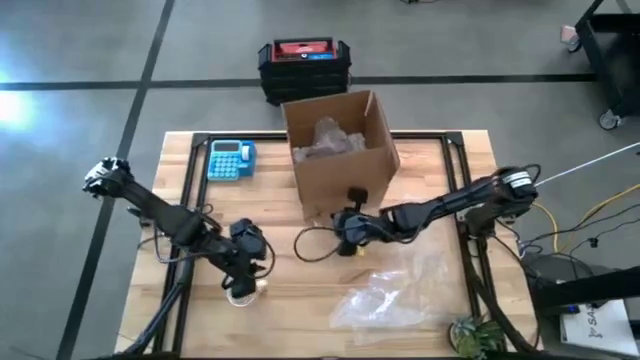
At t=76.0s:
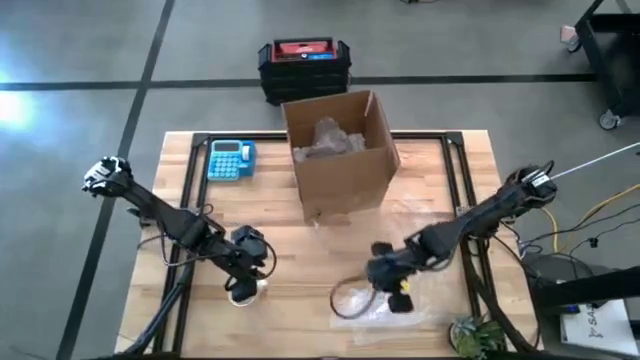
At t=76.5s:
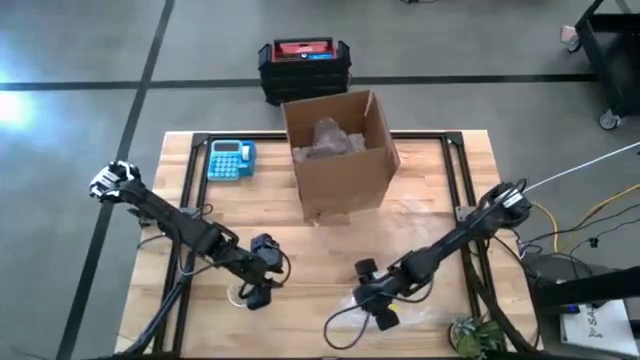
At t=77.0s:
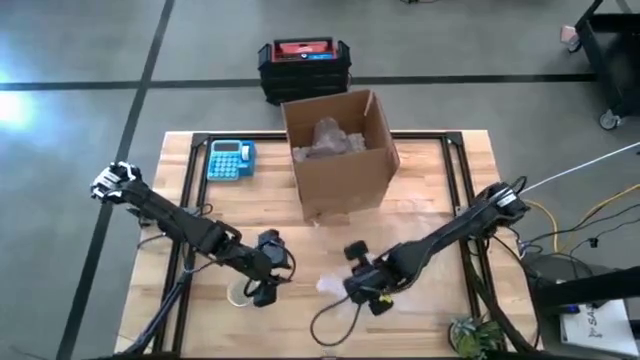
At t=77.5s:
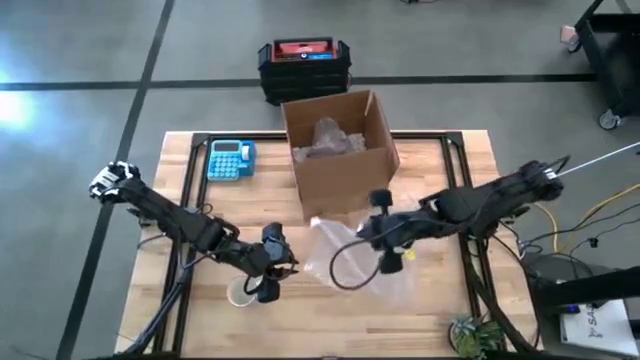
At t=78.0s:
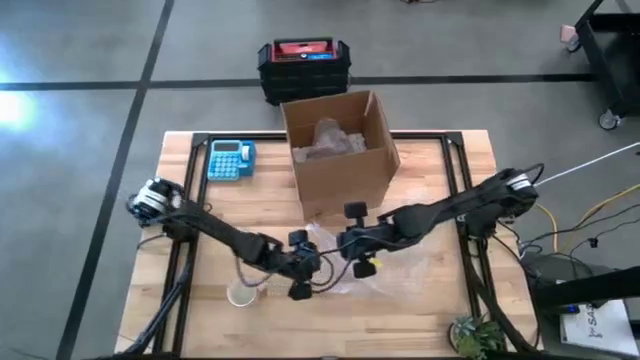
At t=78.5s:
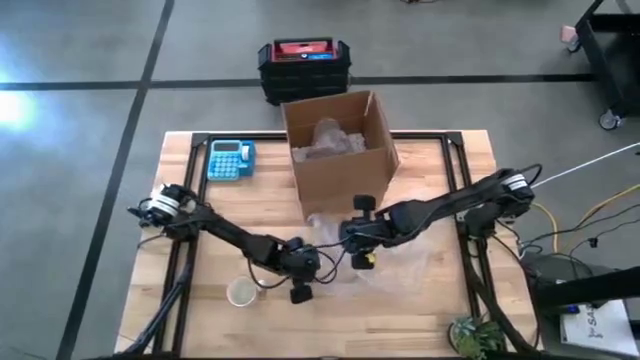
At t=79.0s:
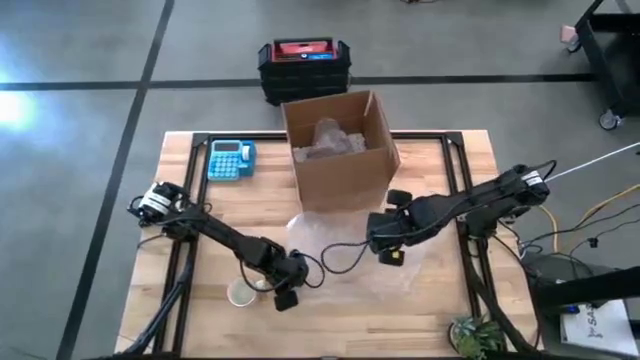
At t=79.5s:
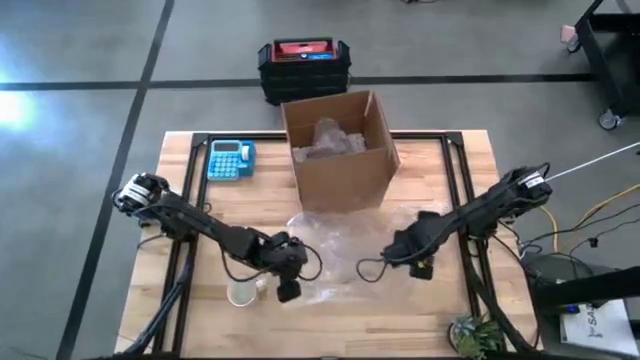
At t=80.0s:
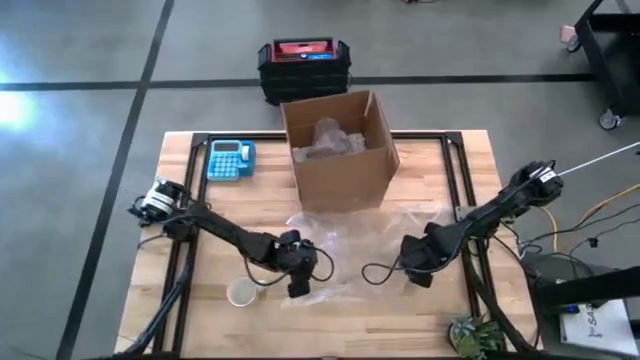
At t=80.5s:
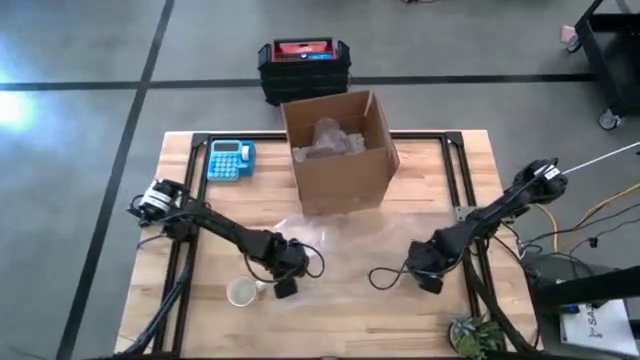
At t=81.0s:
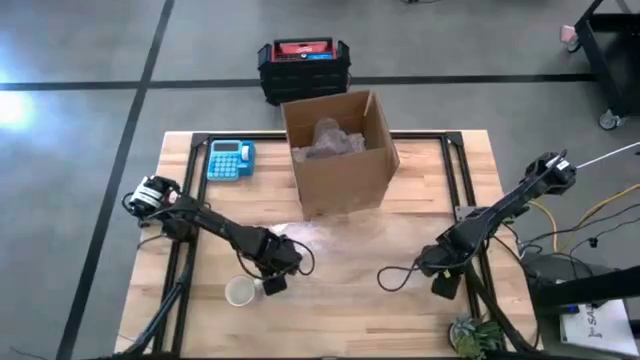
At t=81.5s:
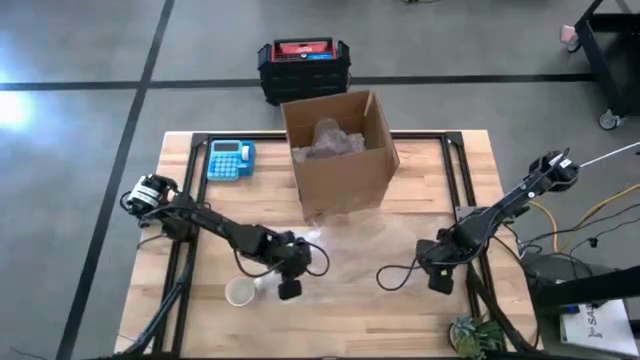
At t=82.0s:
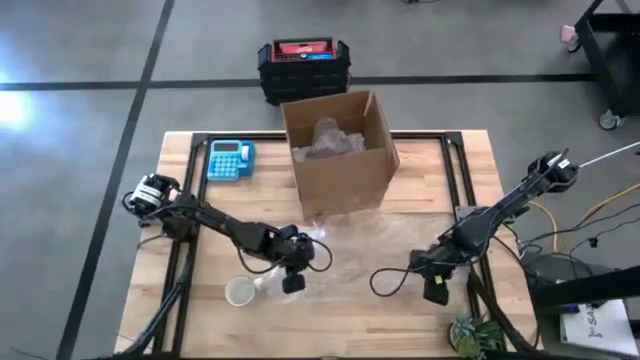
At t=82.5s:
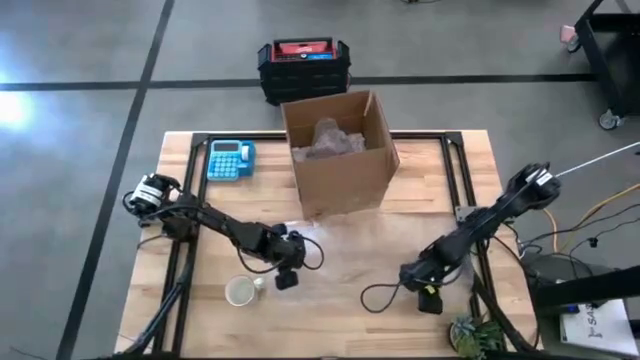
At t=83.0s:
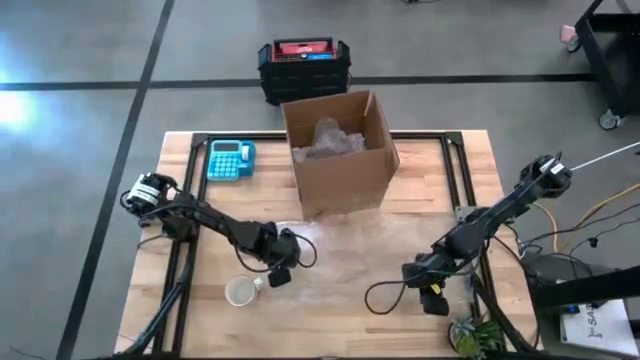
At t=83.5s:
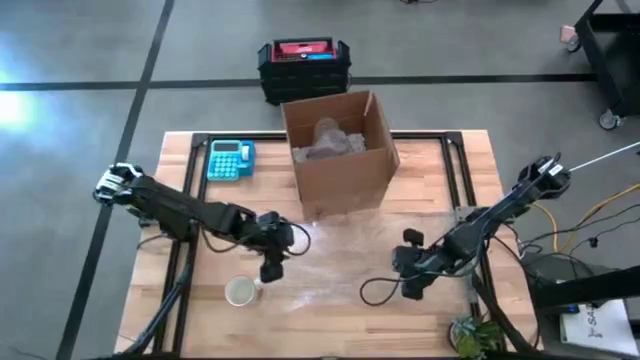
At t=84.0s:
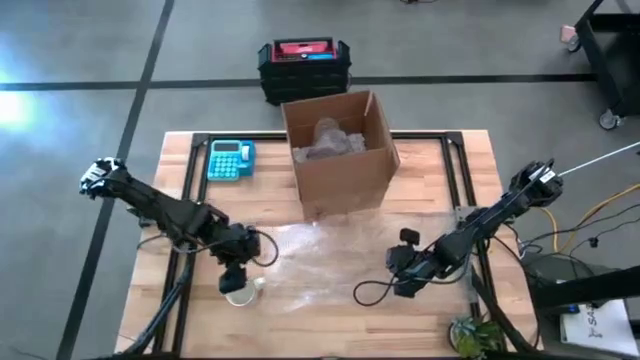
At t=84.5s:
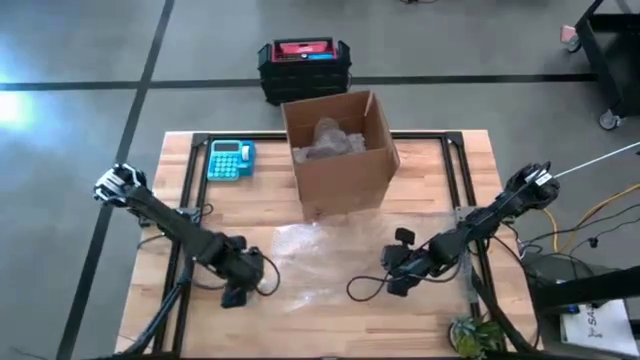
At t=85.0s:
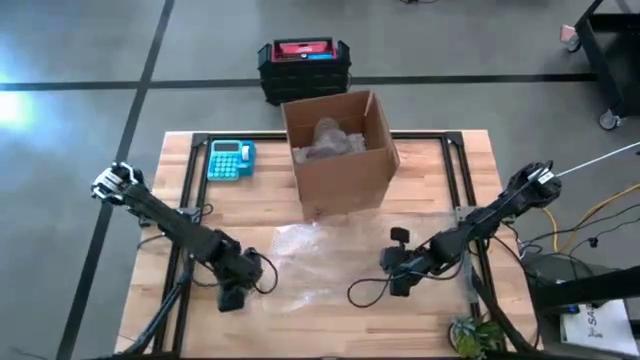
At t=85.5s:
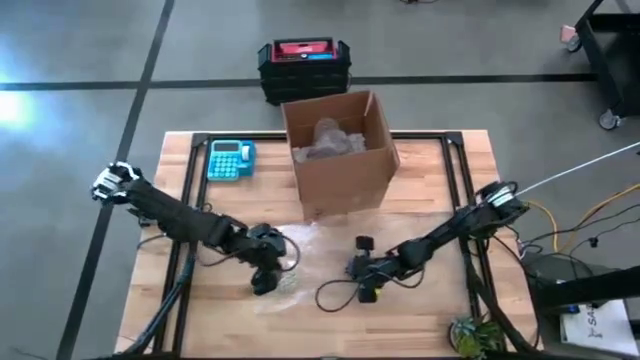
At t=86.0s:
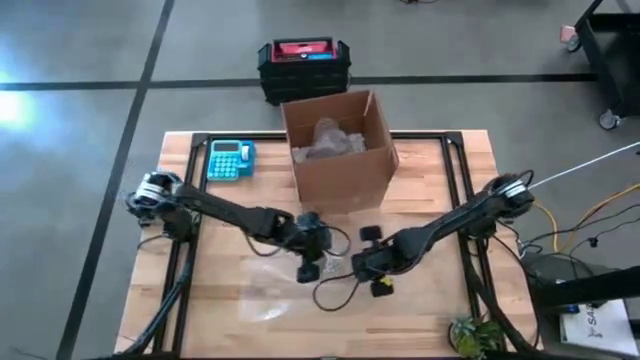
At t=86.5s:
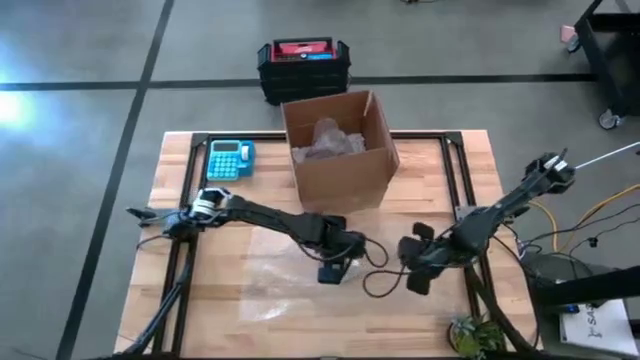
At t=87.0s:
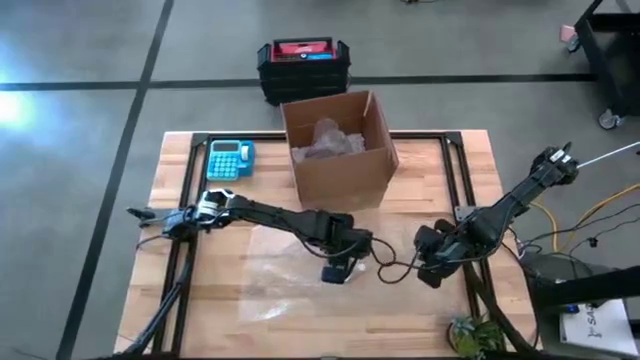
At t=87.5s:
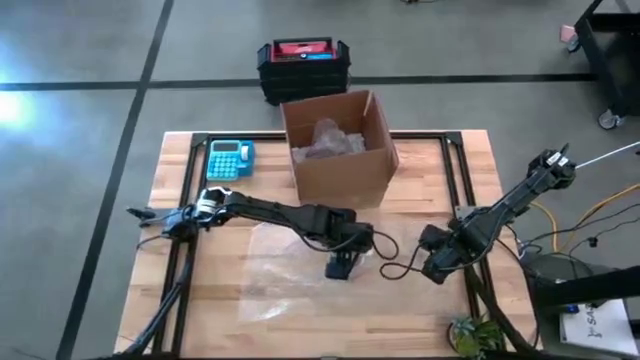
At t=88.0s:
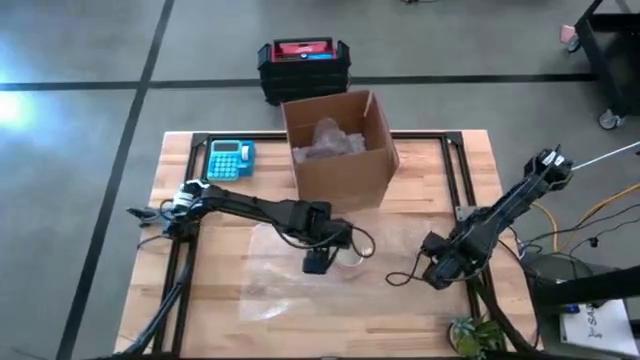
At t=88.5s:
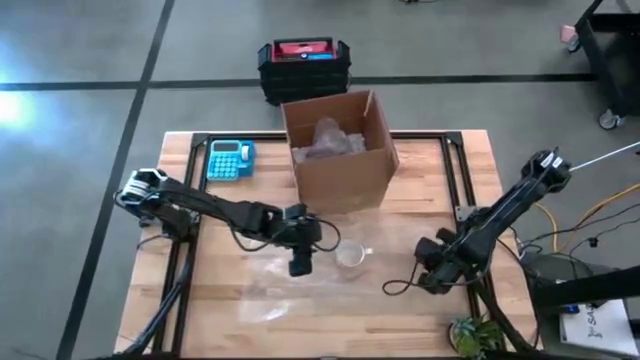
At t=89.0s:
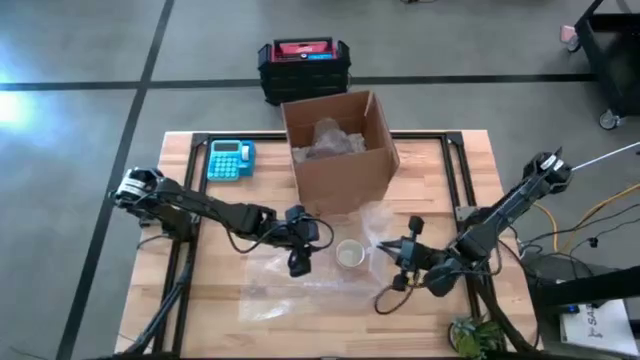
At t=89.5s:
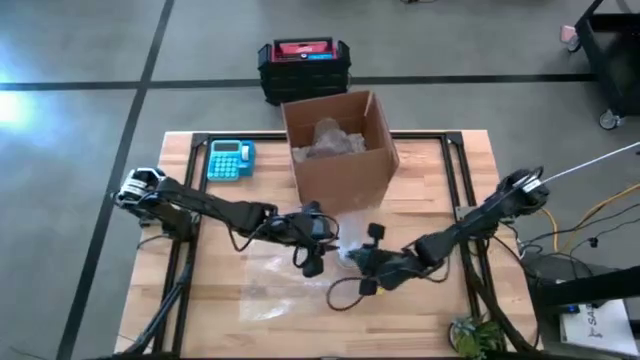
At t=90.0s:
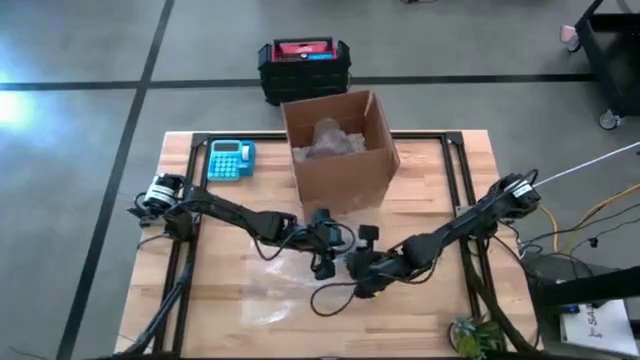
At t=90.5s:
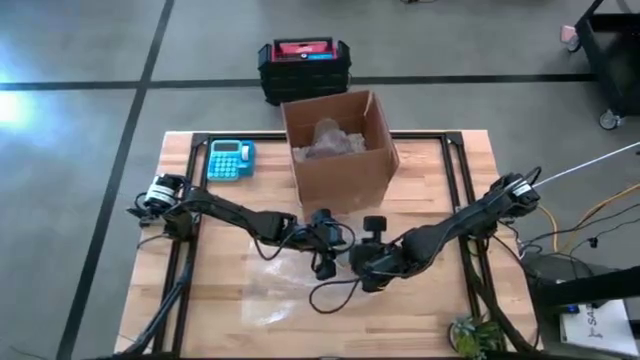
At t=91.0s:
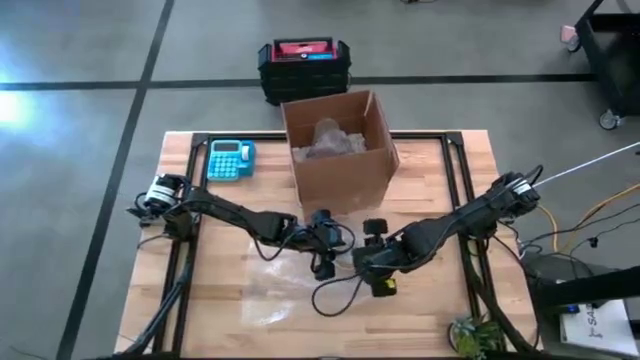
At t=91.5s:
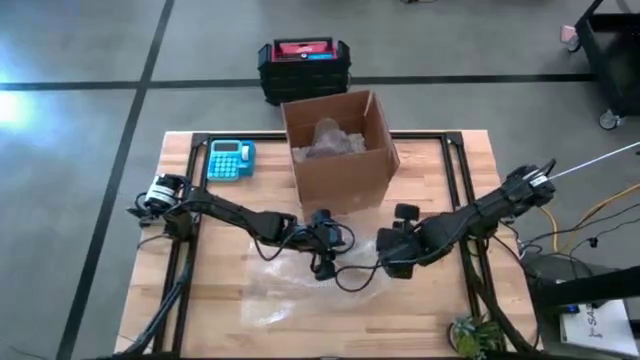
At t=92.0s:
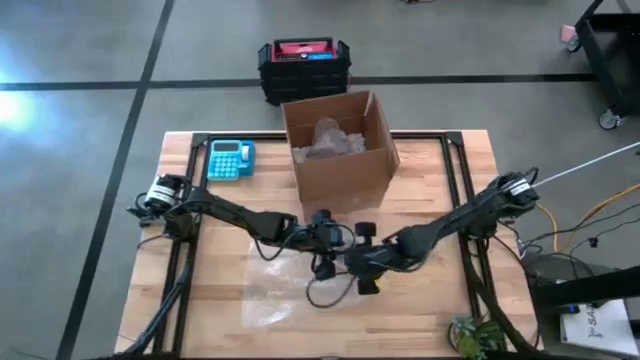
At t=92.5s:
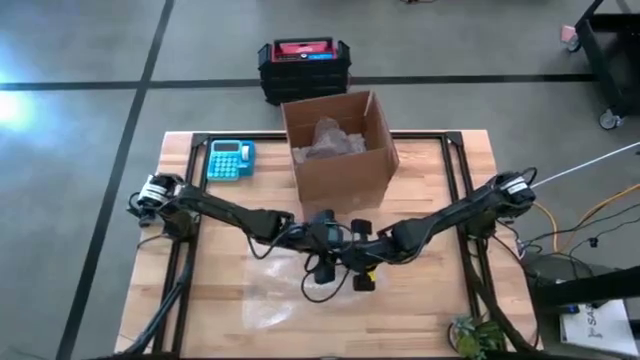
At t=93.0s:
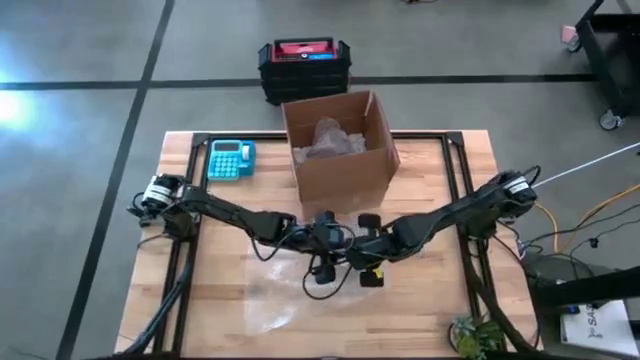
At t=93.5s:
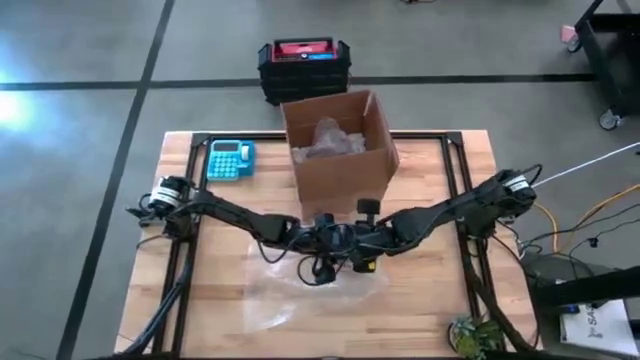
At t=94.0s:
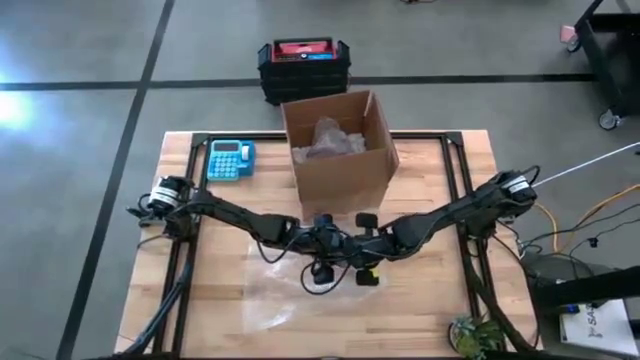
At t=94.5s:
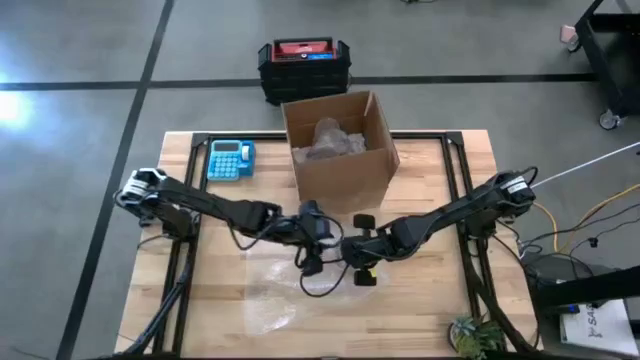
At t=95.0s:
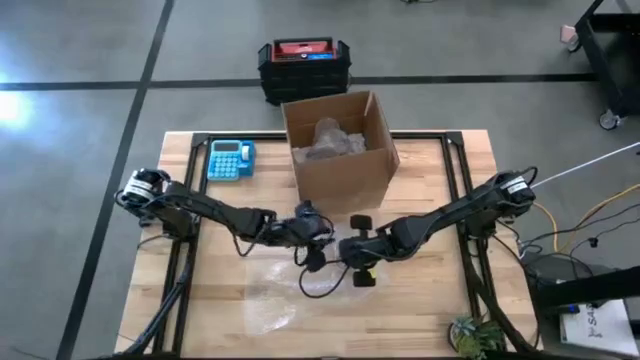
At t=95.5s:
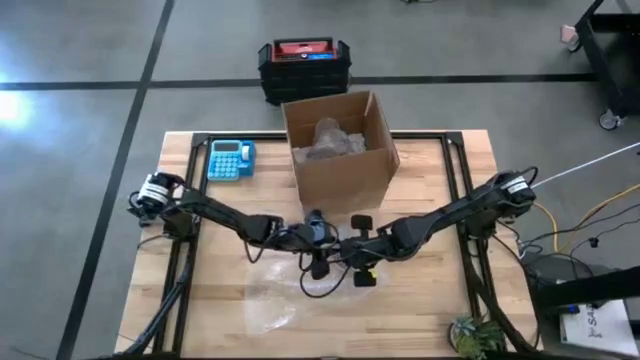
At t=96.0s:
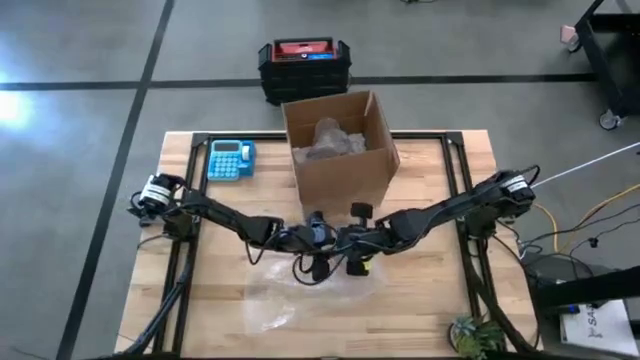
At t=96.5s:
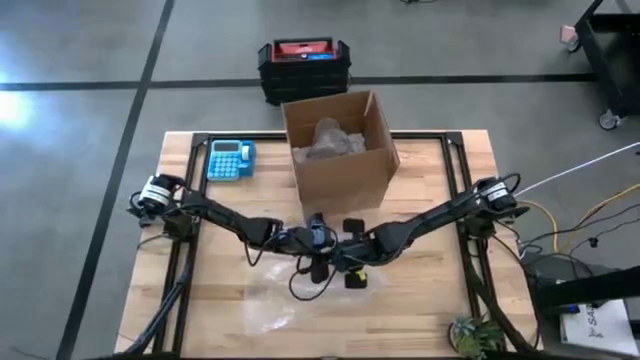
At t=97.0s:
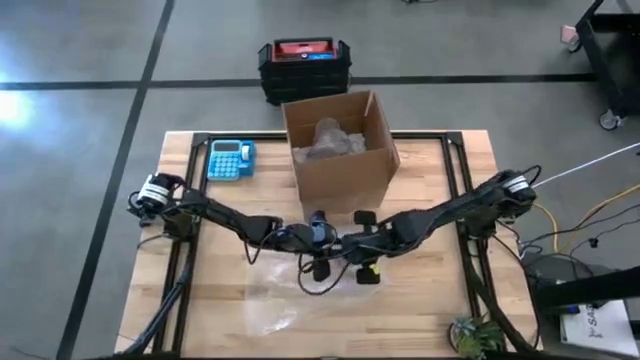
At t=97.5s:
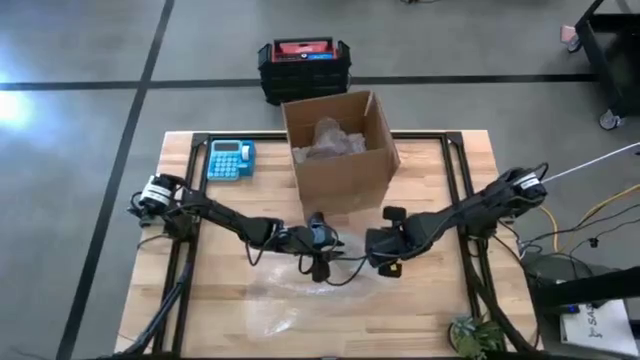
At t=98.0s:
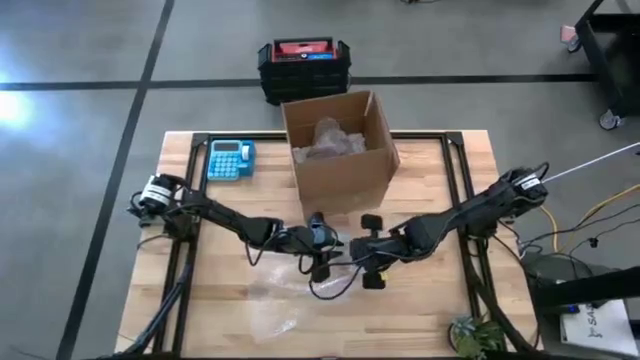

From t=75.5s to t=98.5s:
Task: wrap mug
Wrap the gray mug with bubble wrap
